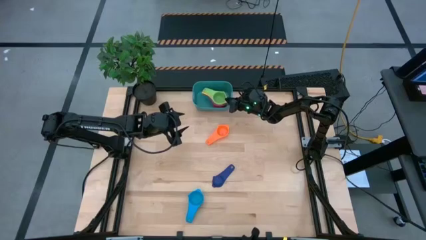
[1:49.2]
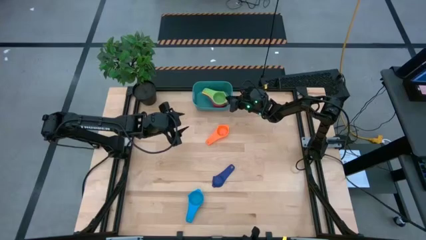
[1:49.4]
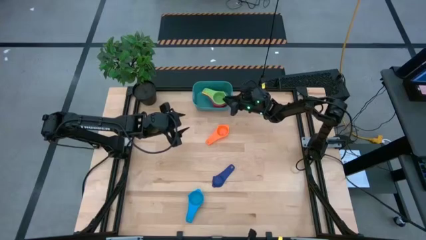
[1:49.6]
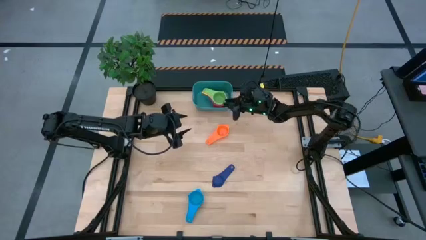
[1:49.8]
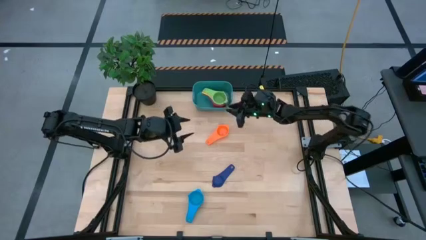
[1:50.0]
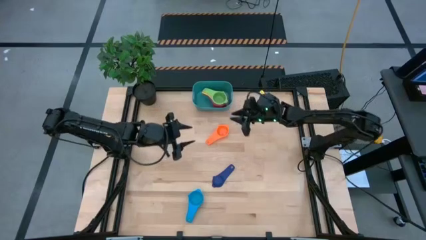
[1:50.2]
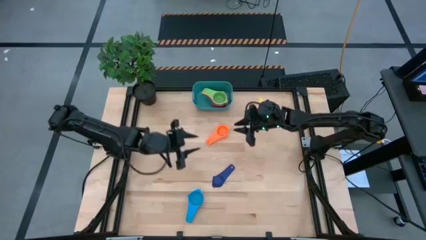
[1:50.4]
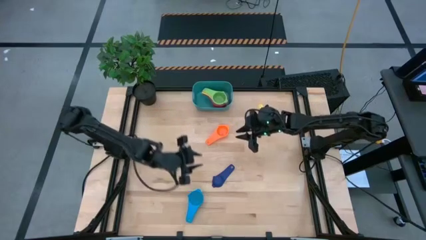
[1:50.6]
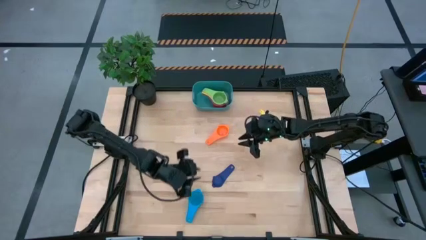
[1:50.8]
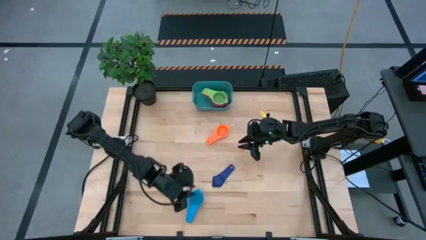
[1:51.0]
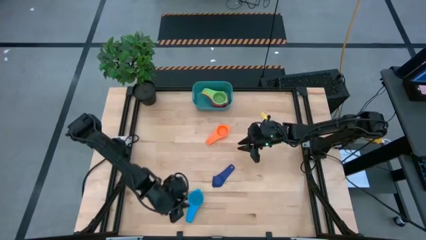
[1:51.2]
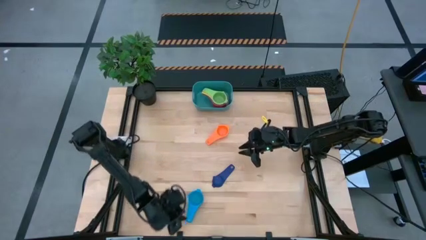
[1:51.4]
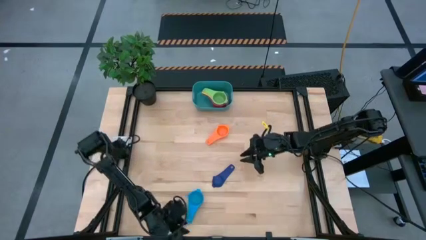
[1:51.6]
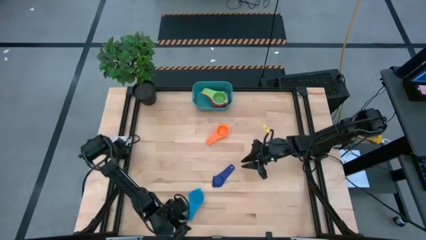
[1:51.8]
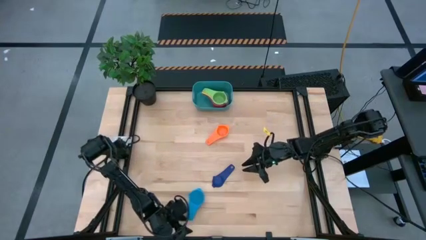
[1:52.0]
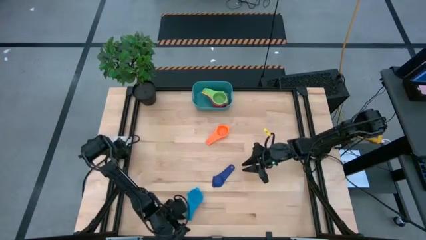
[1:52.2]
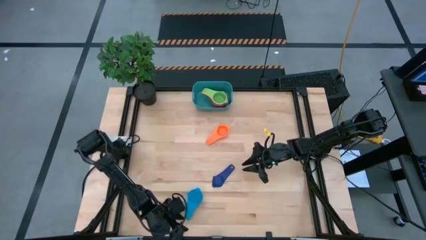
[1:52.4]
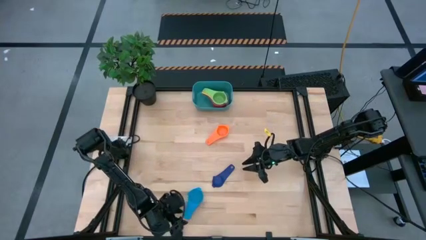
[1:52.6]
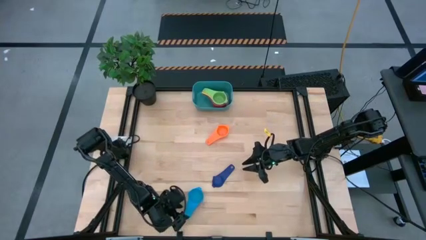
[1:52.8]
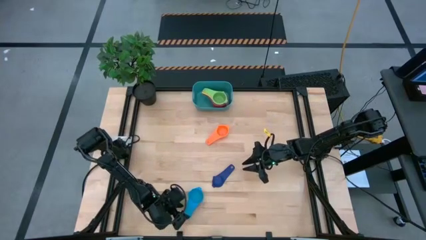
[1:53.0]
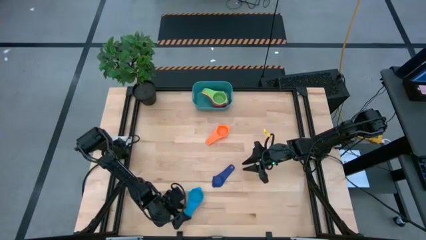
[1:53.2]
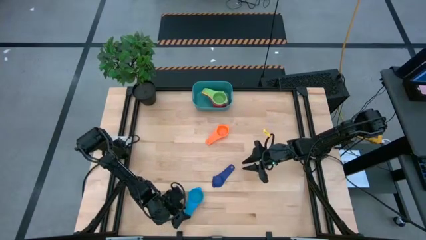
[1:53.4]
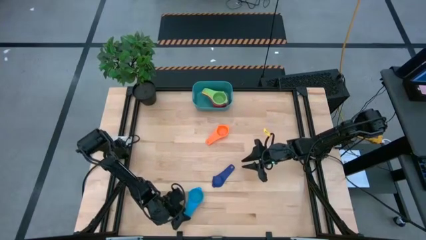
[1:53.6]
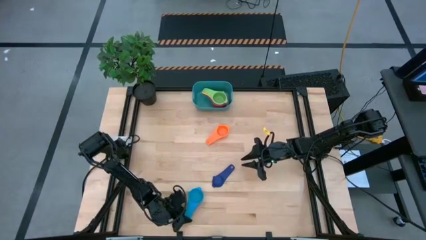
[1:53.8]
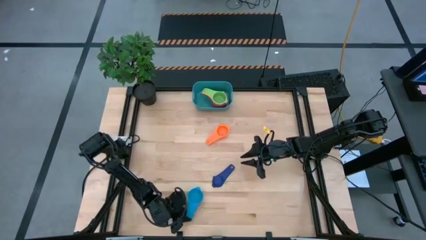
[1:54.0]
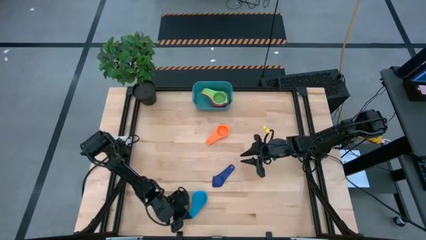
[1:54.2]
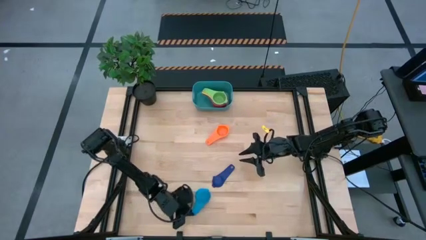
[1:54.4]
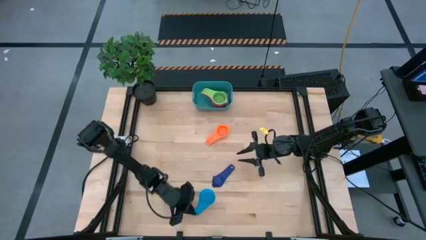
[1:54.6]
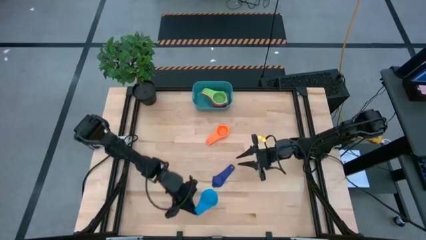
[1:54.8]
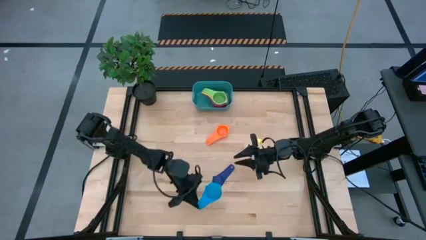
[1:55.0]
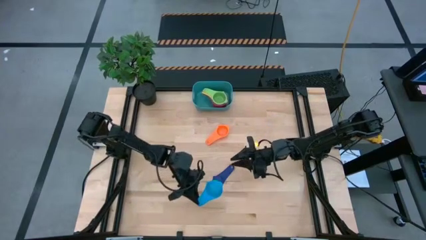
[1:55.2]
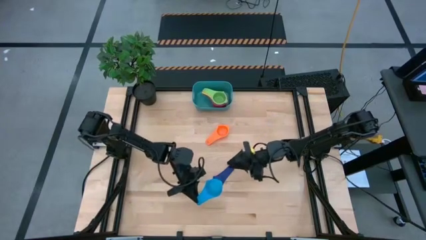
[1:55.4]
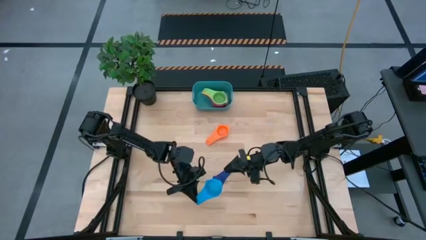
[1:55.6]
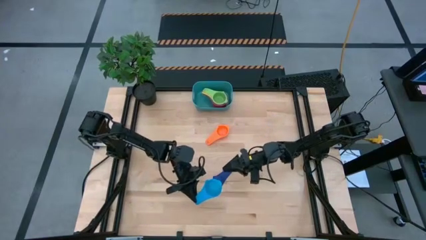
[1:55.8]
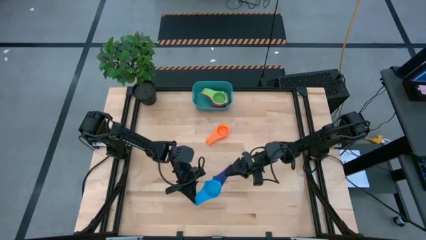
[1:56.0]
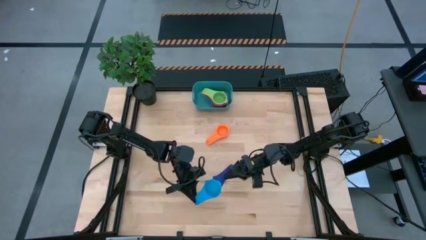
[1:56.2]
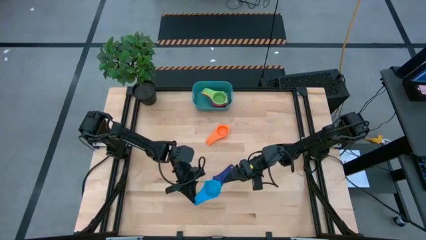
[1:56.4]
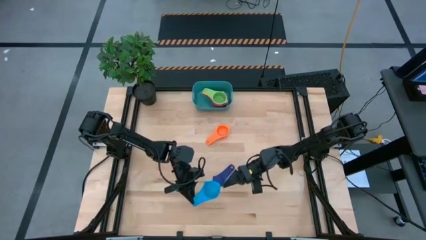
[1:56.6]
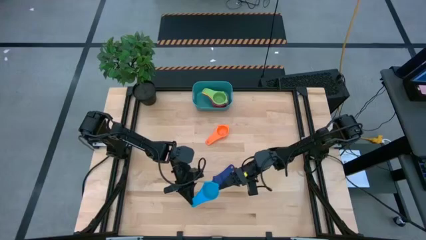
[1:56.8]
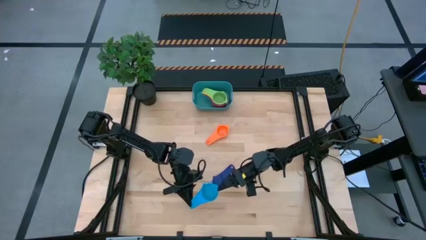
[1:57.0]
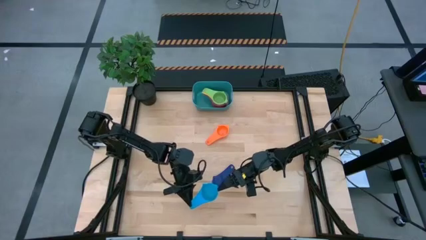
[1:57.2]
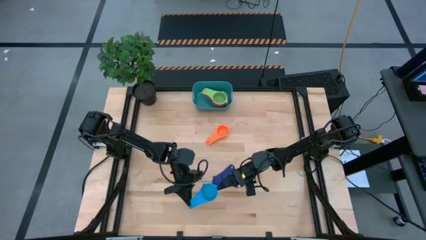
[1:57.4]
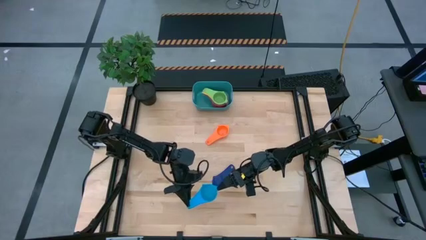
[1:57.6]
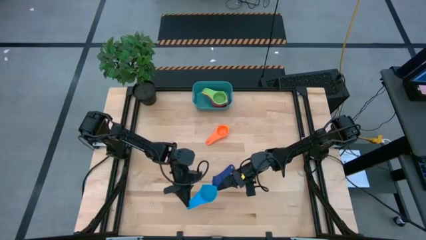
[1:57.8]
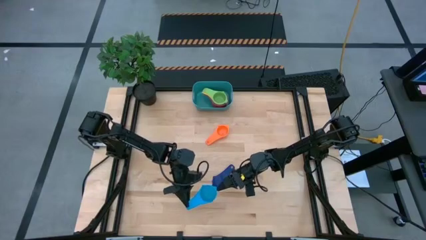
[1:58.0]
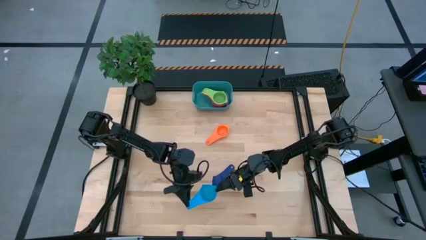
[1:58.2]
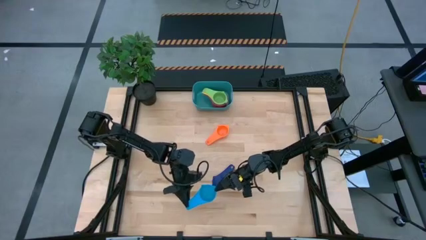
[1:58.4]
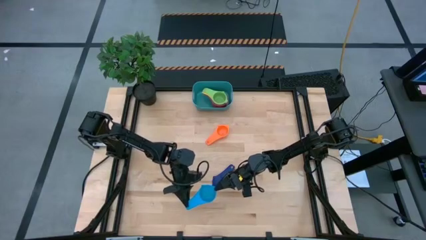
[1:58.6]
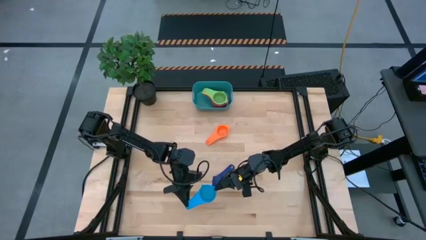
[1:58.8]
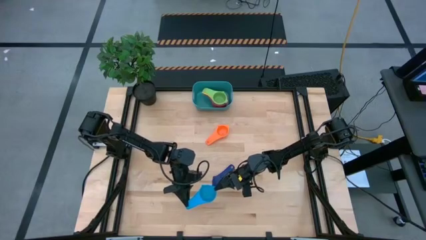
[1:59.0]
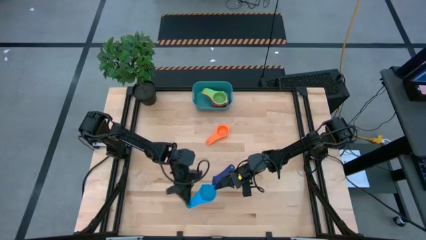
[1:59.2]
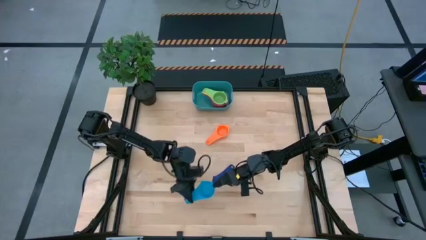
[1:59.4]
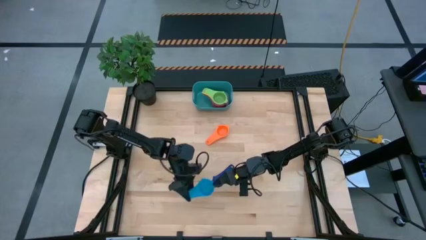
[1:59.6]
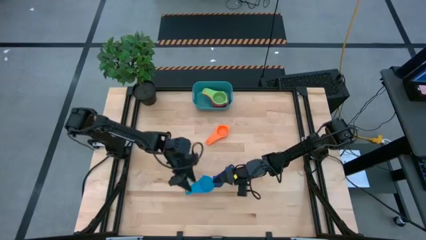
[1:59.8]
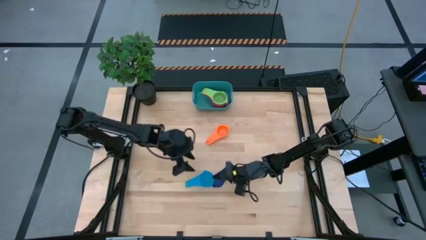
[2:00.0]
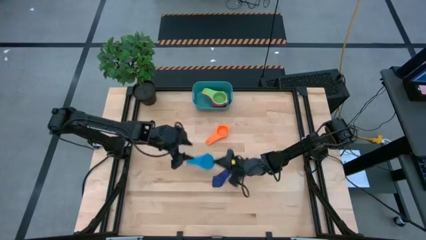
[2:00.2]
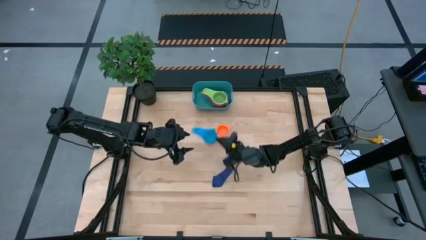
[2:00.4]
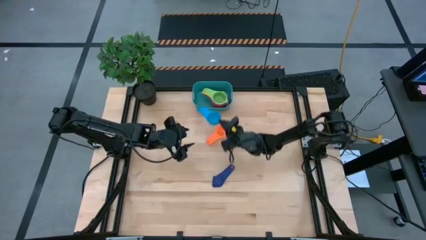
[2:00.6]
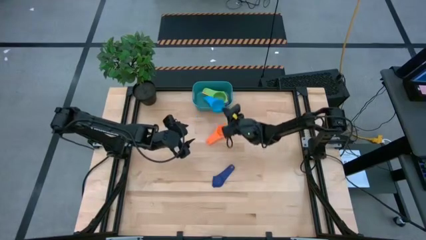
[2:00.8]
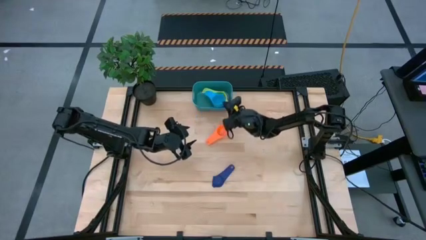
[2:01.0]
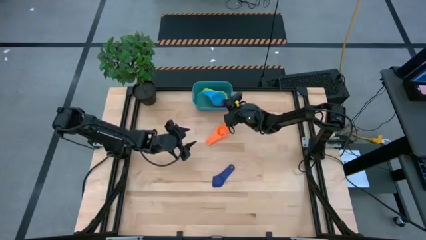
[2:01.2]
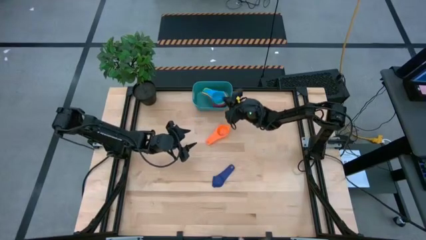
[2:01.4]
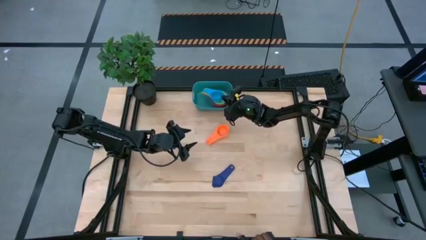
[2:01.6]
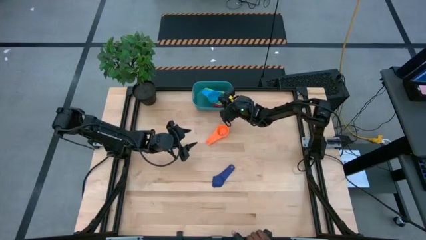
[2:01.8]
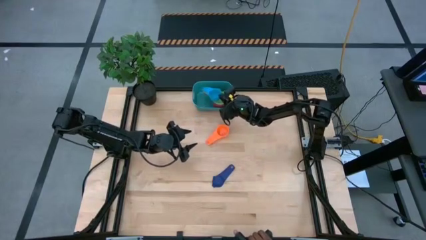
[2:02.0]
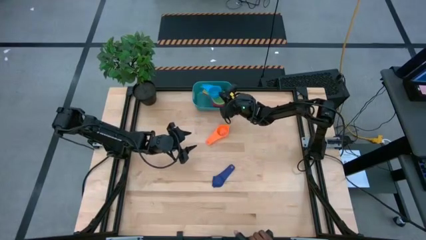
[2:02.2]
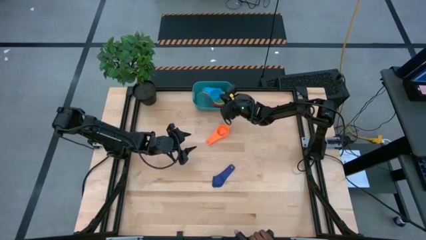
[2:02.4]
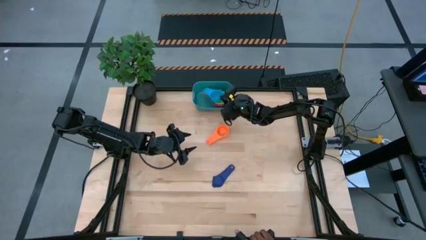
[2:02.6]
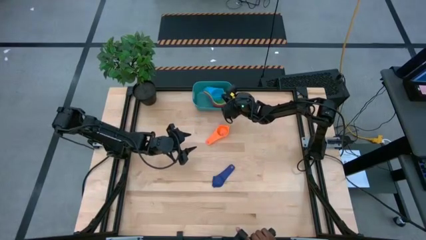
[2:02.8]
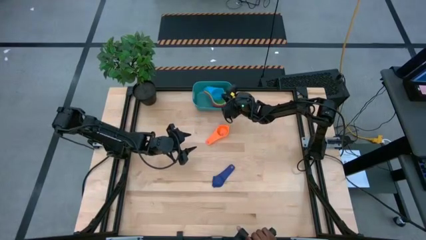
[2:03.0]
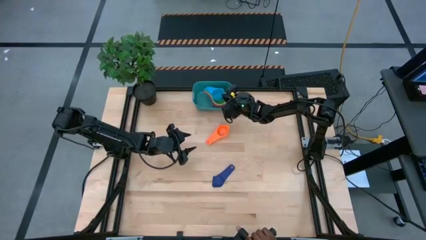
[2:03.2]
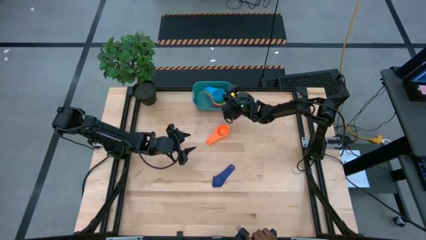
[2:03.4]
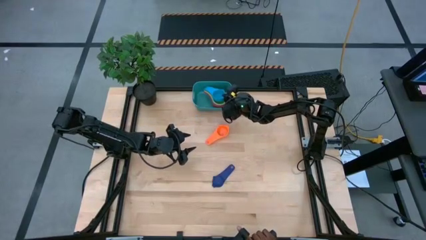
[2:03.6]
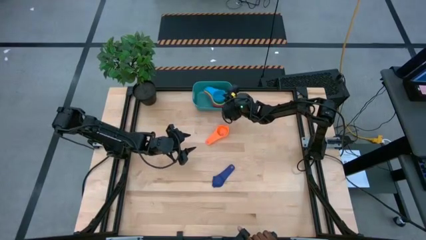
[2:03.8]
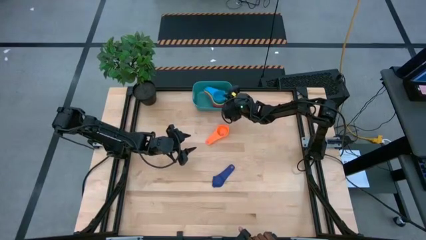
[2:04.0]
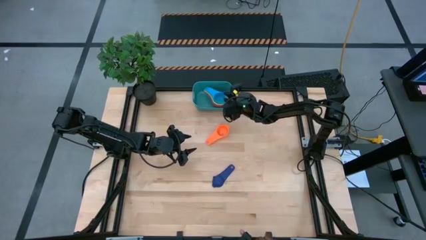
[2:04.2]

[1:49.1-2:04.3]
Task: Nest measuring cups in basket
Stack the light blue measuring cup on top of the green measuring cup in the blue bin
